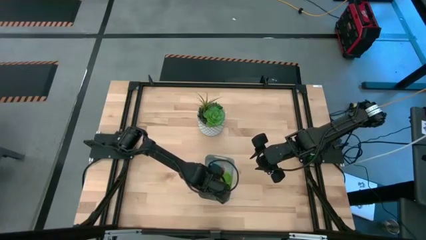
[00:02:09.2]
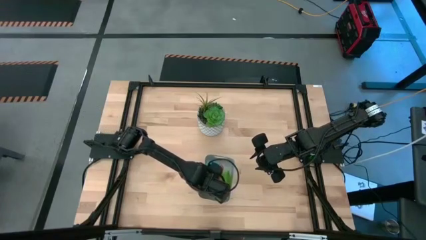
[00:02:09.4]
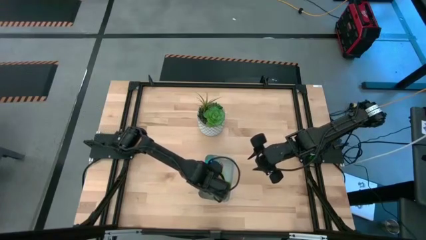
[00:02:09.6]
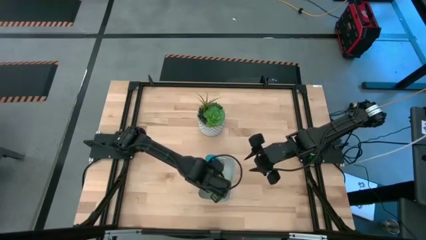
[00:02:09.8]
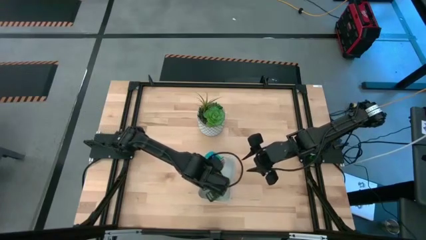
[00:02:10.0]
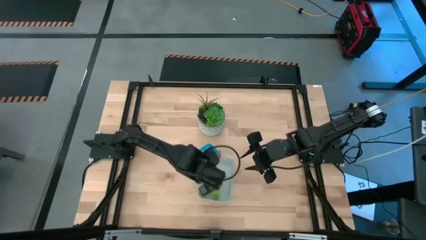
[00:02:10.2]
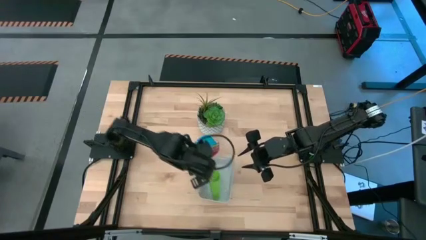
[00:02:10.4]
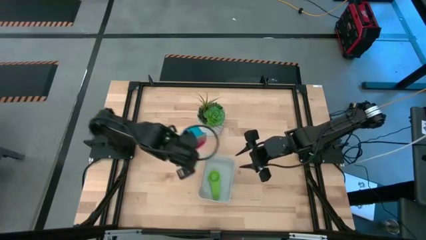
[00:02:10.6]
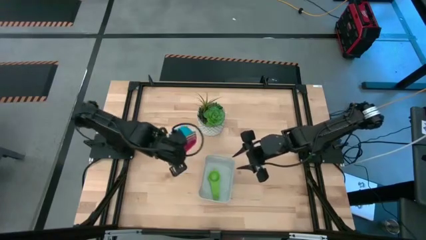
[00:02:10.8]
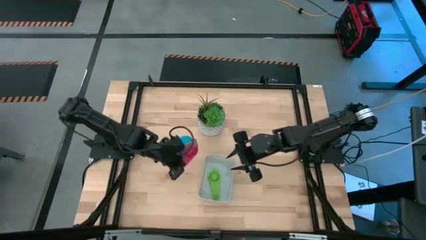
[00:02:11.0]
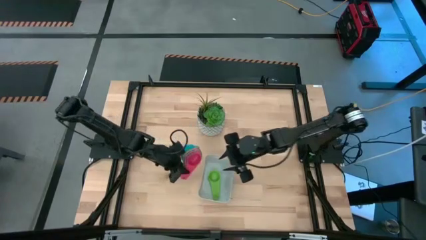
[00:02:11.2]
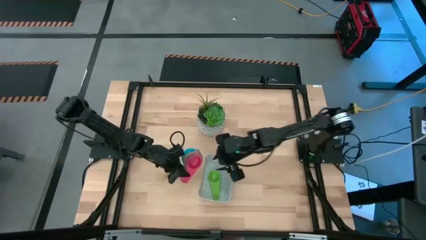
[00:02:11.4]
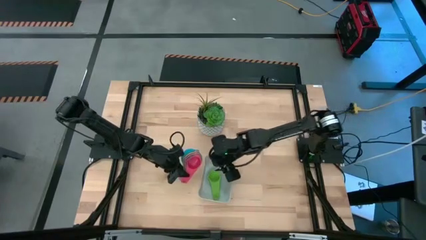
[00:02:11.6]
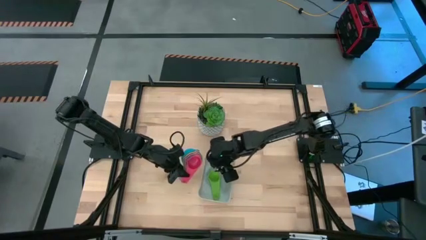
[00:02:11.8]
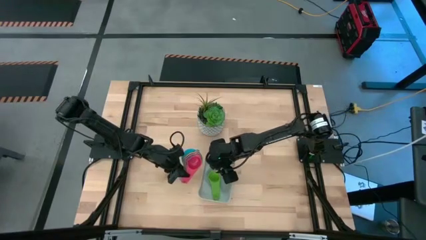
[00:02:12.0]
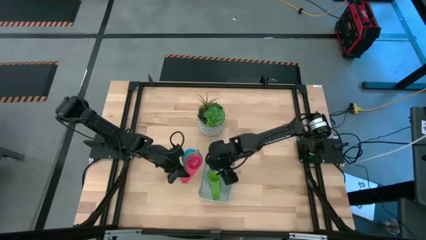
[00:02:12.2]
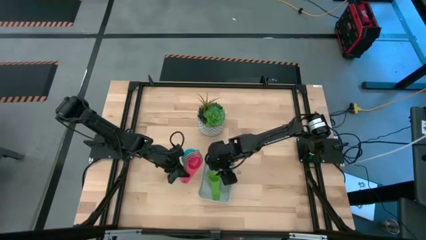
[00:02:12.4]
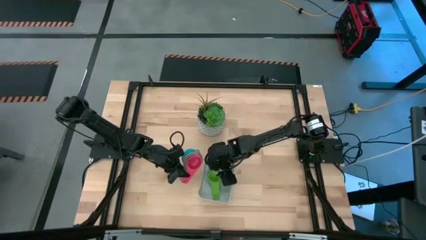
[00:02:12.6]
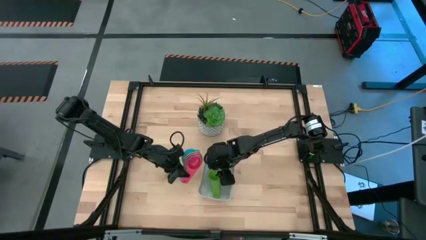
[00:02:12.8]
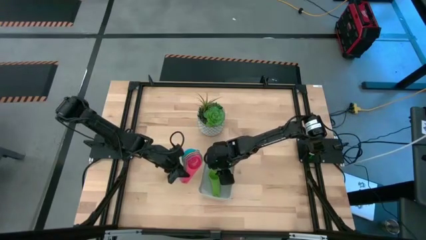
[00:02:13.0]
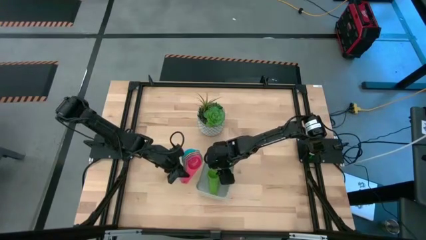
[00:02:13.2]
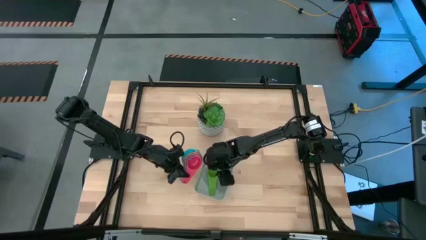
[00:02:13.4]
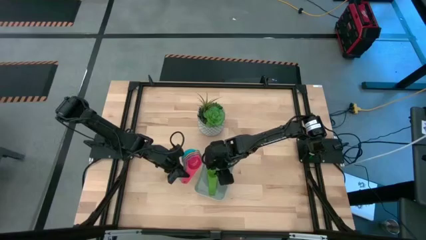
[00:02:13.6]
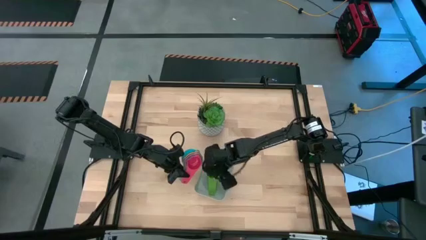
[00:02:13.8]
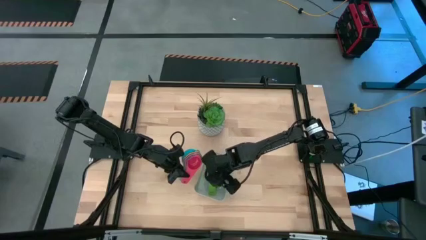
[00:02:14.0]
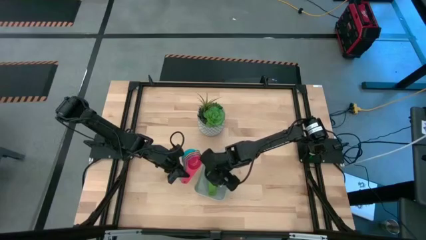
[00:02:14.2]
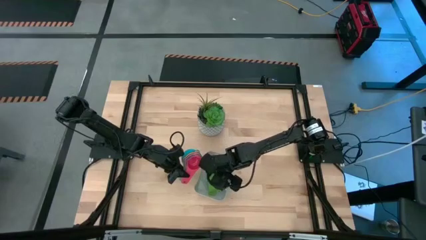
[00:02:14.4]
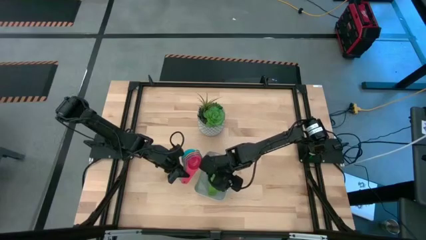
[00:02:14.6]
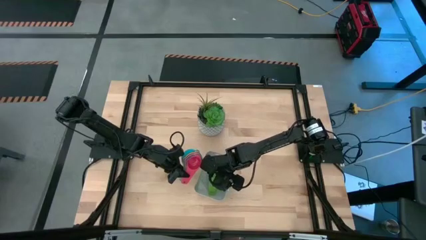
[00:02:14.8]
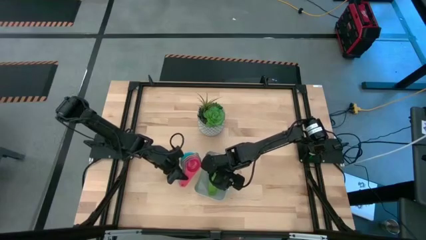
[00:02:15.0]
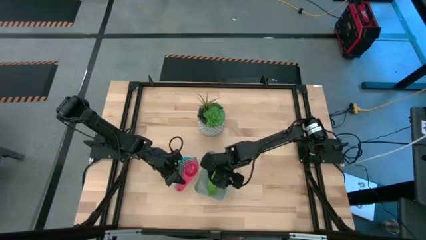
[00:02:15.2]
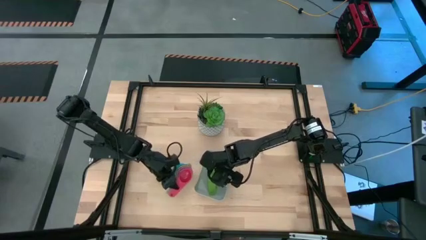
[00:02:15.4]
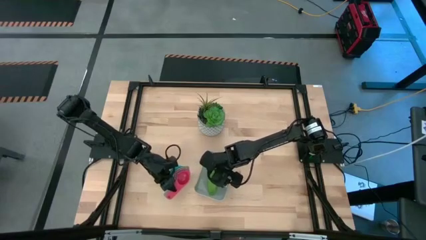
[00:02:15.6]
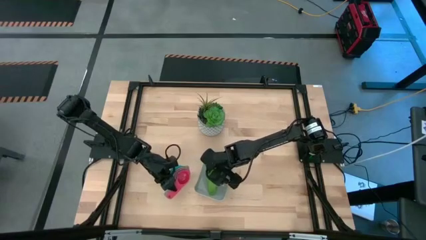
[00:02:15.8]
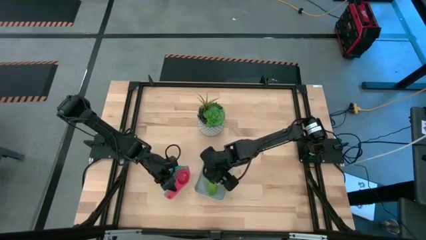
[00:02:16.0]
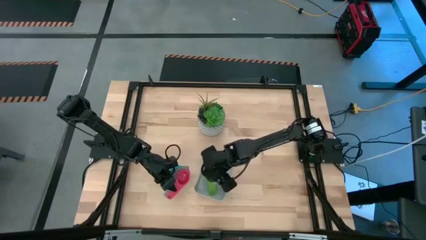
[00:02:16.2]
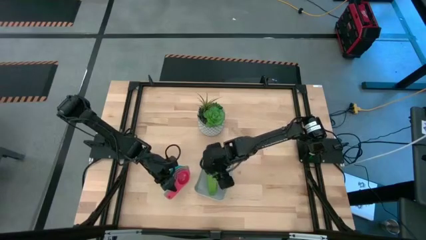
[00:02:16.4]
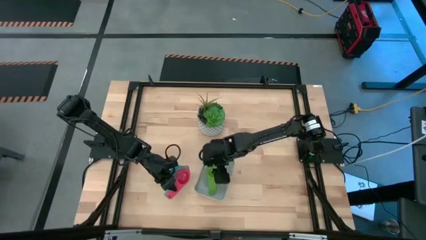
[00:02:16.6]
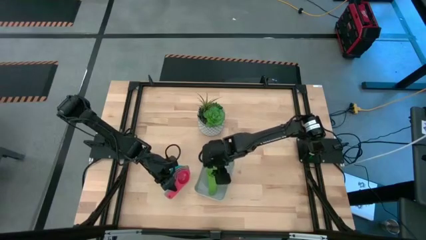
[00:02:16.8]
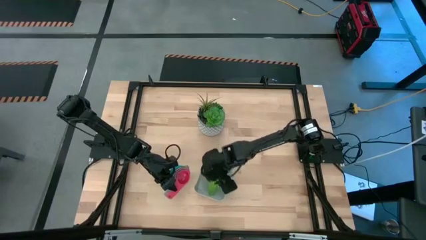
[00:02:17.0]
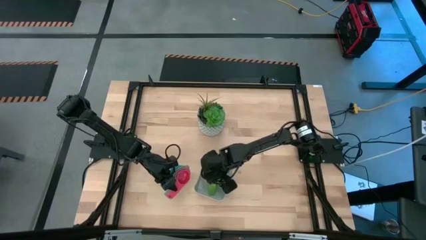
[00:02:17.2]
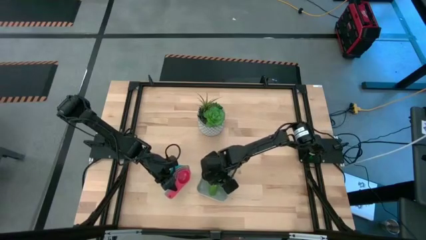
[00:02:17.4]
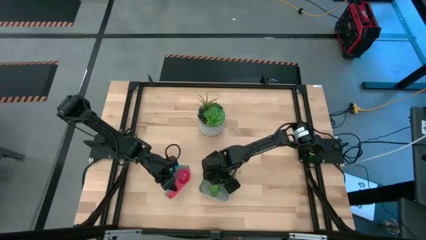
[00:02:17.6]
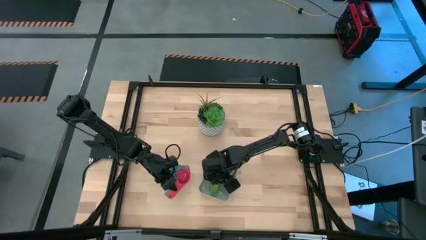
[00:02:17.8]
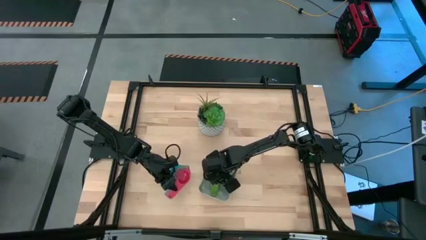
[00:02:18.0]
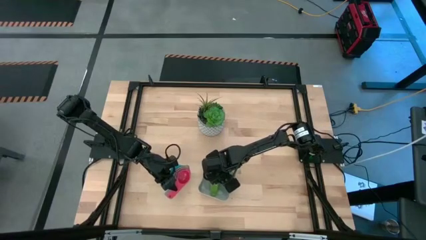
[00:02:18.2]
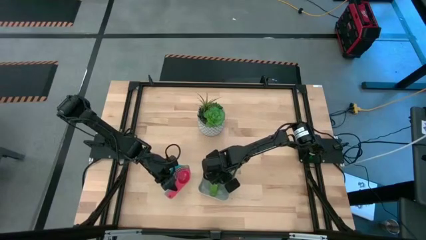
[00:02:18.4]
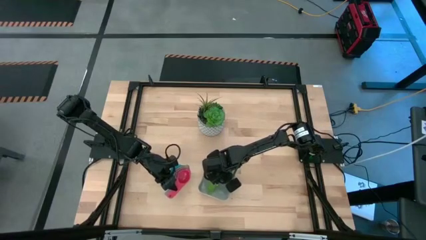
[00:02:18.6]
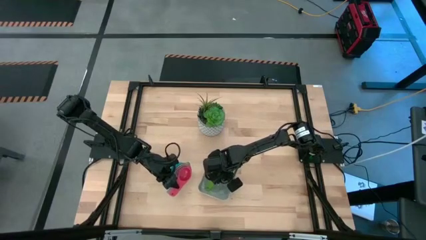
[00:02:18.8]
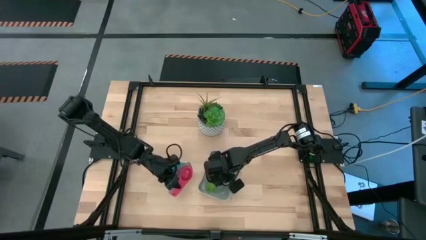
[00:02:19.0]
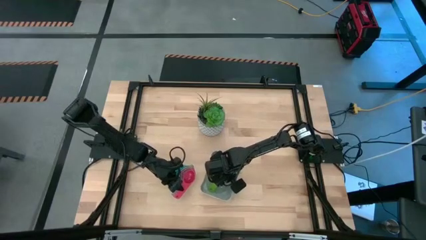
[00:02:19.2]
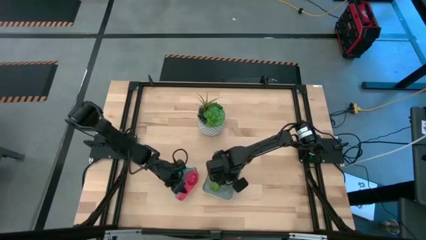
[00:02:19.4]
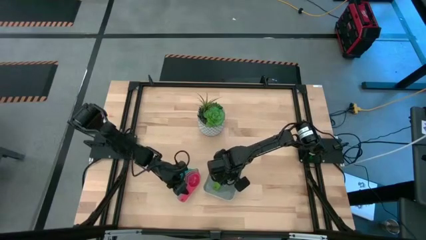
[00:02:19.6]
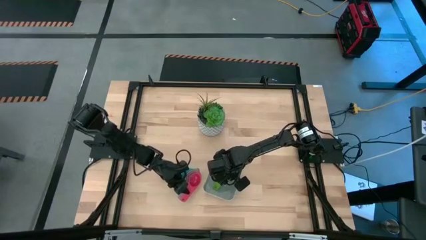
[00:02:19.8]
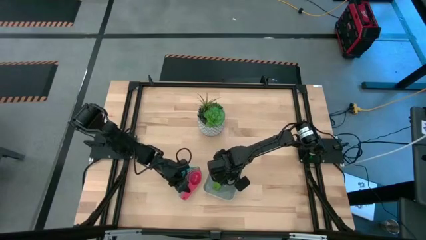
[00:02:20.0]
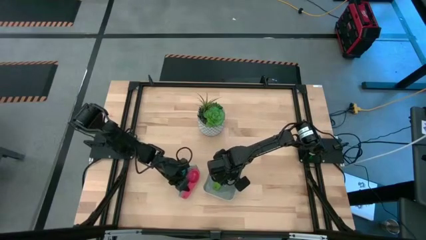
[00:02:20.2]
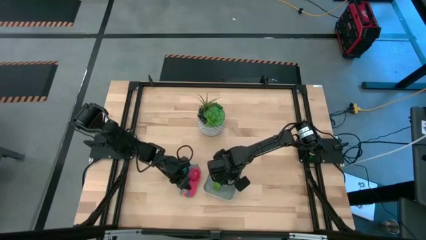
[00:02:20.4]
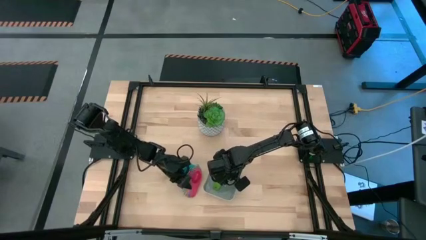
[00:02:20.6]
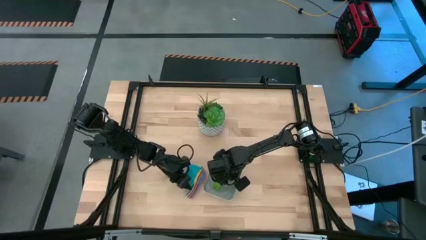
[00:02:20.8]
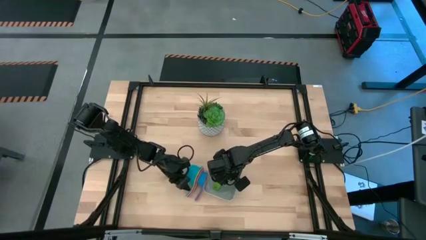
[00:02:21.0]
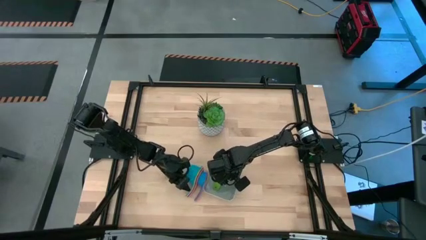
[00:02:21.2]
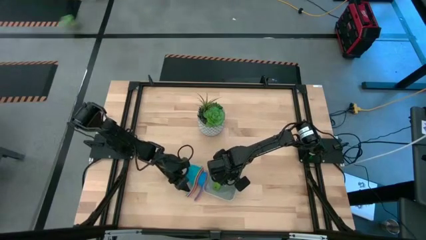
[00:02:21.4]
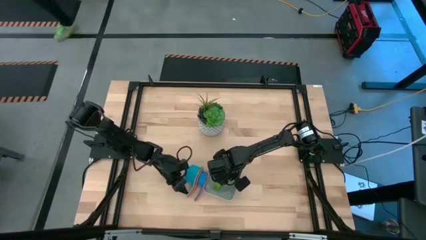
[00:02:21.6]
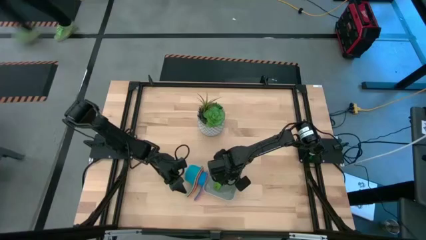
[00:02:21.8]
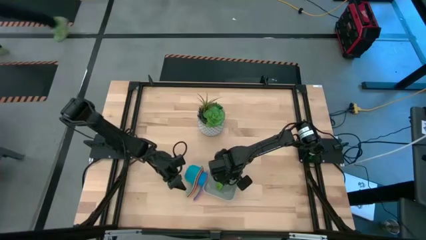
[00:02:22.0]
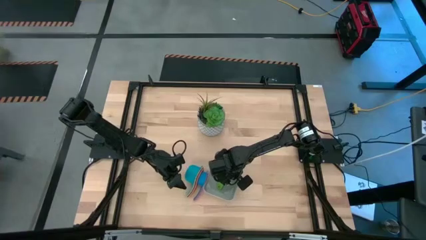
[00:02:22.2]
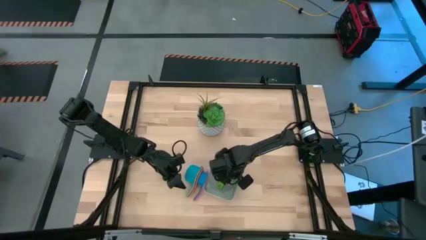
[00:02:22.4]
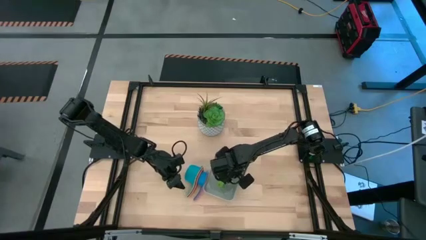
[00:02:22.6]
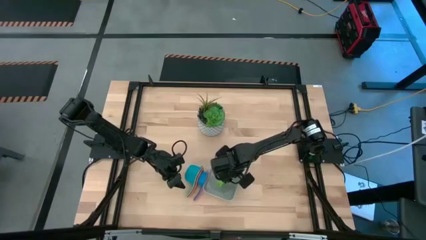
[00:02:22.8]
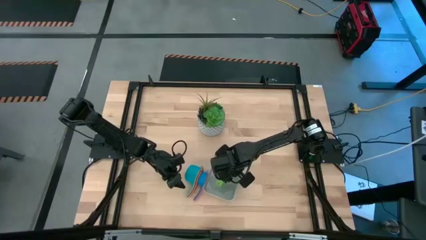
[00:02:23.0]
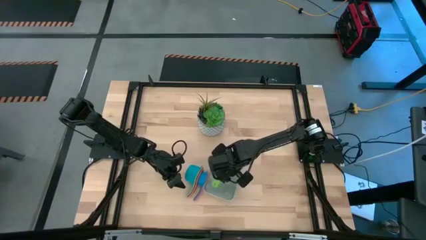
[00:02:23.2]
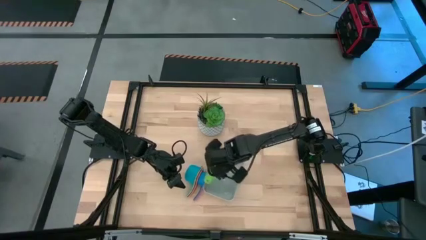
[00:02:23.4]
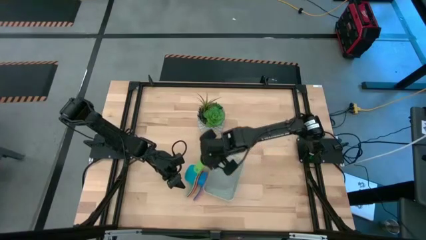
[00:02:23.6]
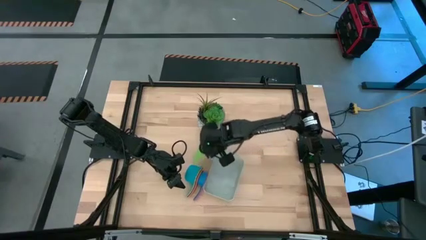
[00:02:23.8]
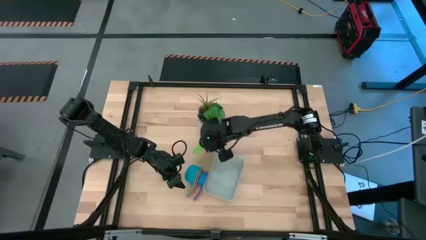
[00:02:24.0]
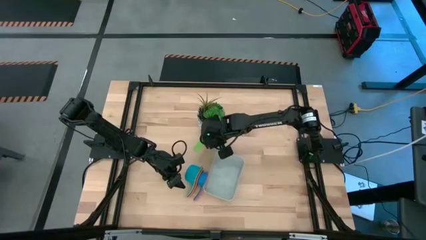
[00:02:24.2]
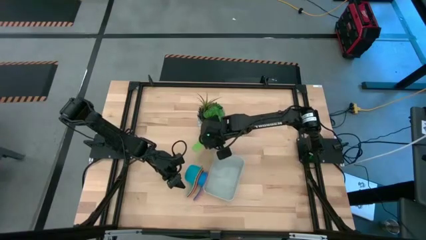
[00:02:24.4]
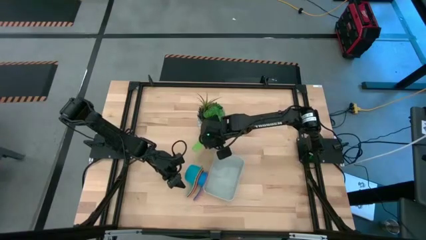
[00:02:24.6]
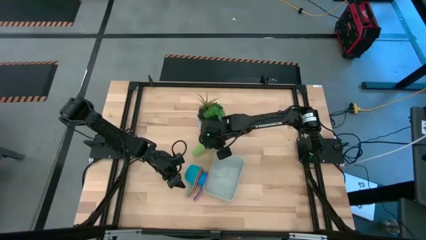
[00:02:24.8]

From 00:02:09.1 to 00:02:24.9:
Task: Nest measuring cups in basket
Remove the measuring cups from the bin
